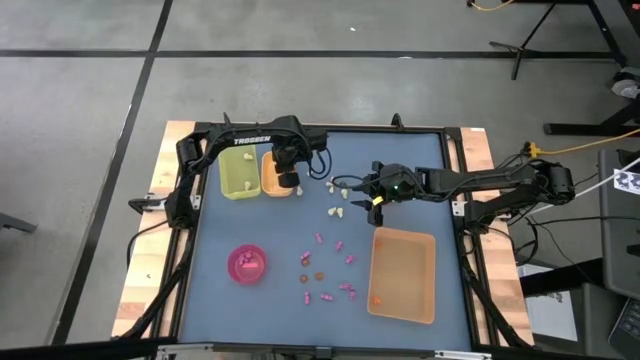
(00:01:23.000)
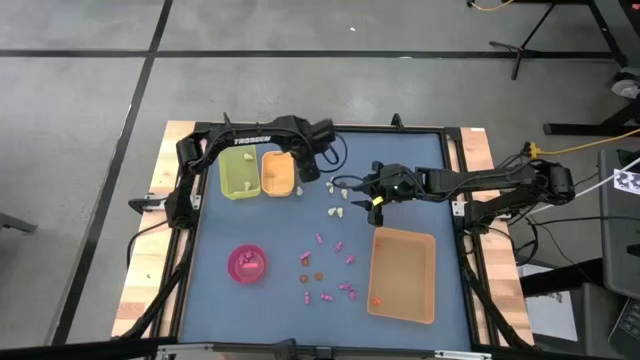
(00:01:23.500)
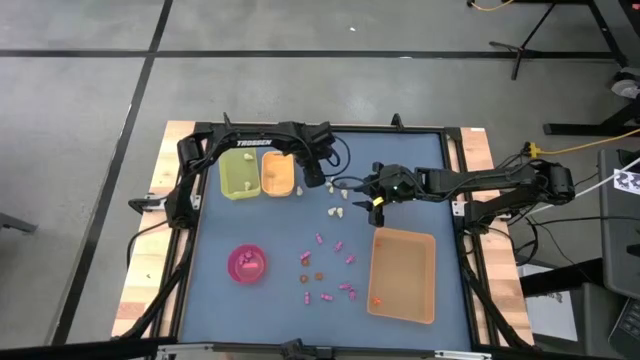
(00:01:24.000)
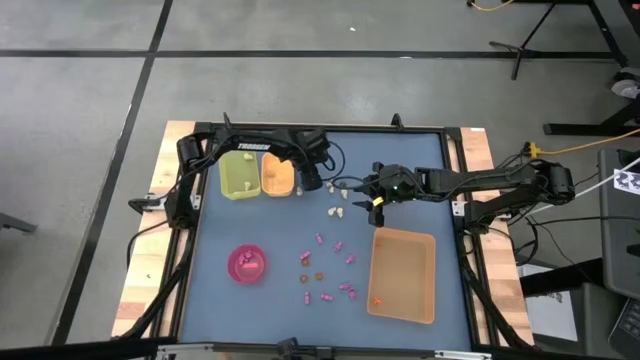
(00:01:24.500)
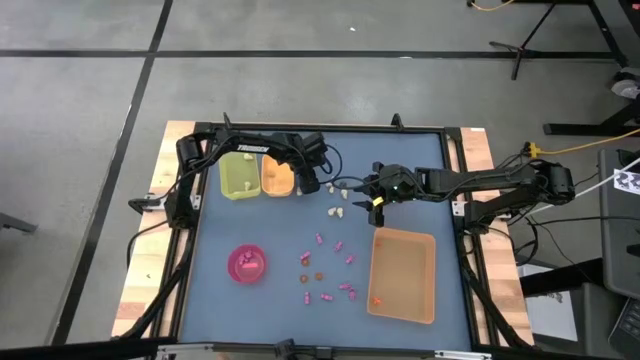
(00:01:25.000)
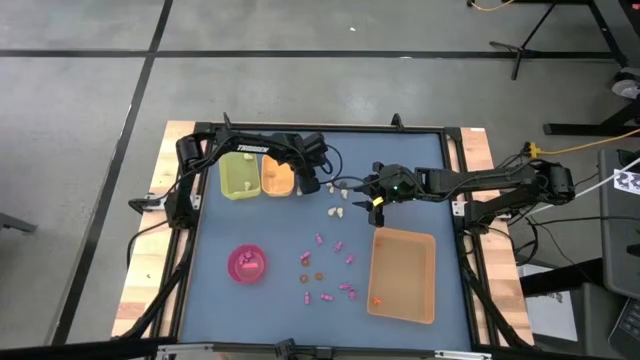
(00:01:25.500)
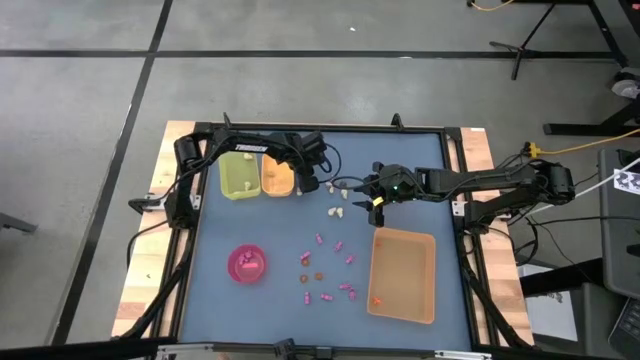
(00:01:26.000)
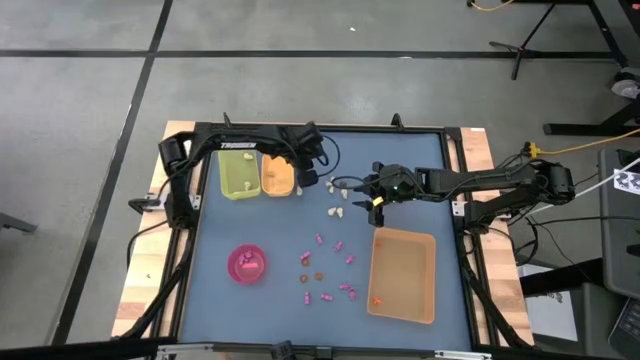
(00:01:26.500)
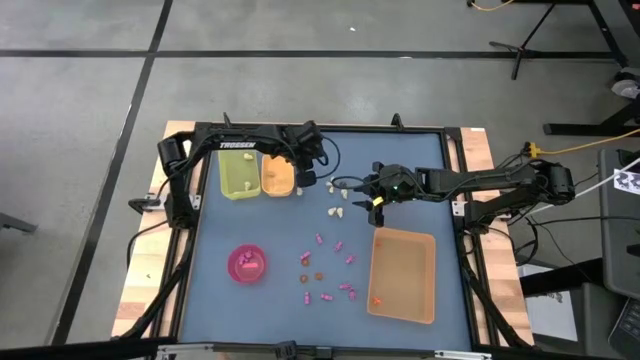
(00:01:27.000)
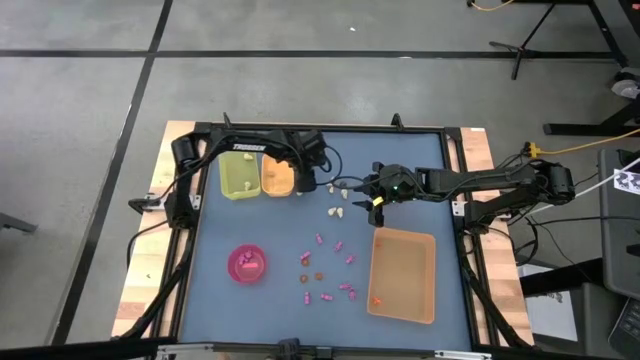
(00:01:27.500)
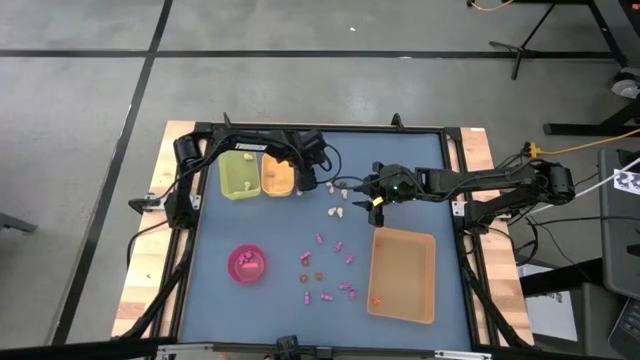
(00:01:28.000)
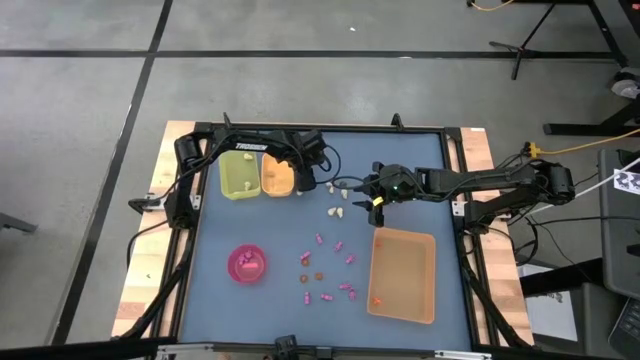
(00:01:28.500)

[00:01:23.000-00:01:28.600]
Task: Sort Halloween decoration
Put the small white skull toy into the yellow bin

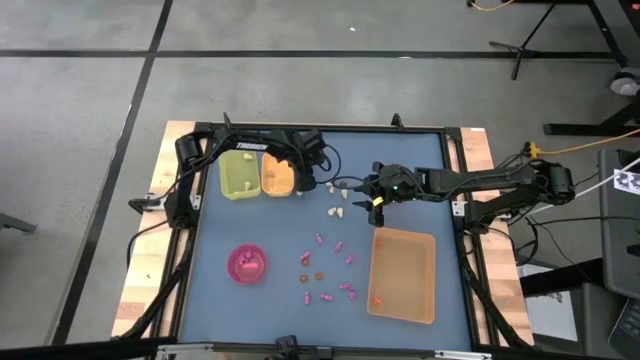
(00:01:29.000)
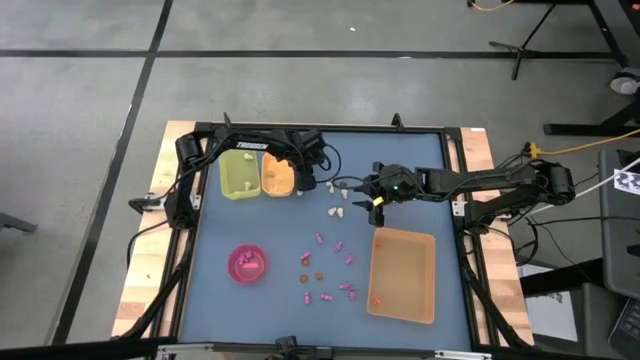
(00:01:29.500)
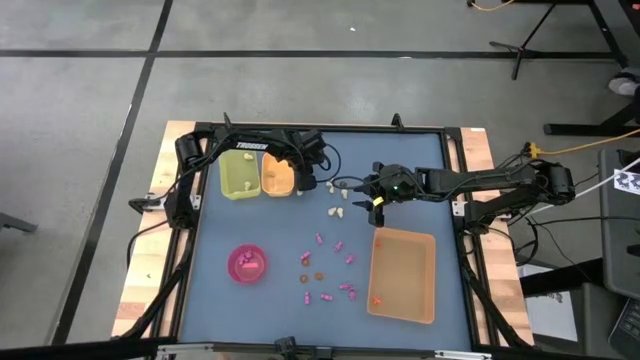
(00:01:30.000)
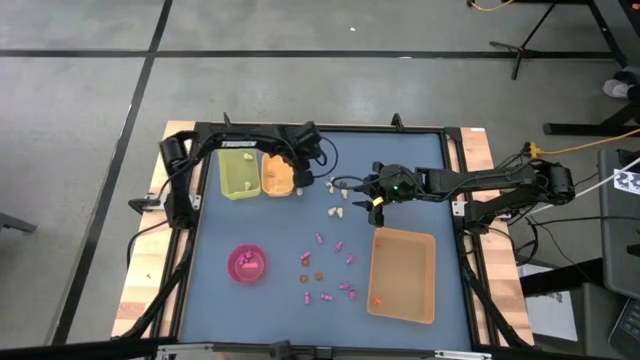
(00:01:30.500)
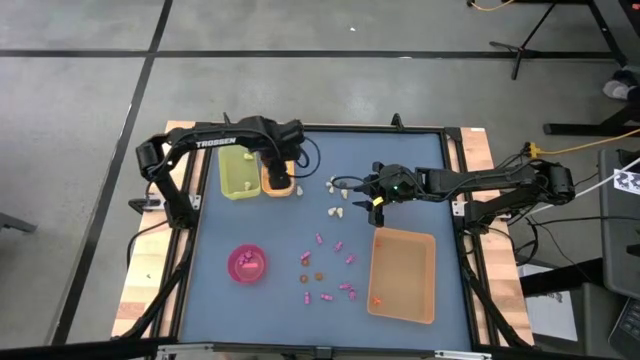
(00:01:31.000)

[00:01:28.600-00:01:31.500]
Put the small white skull toy into the yellow bin

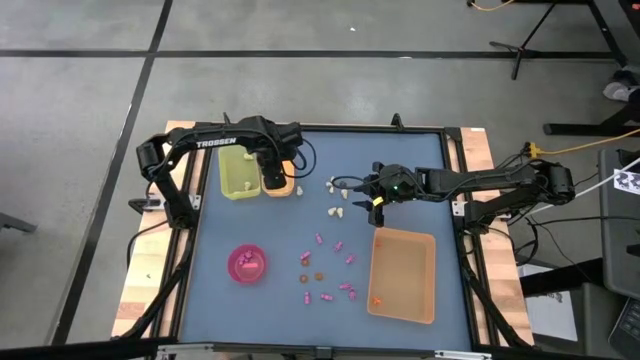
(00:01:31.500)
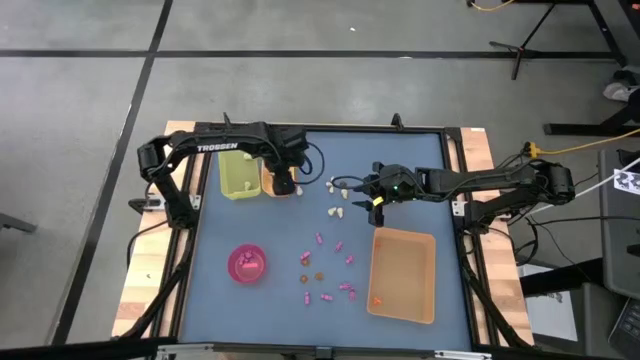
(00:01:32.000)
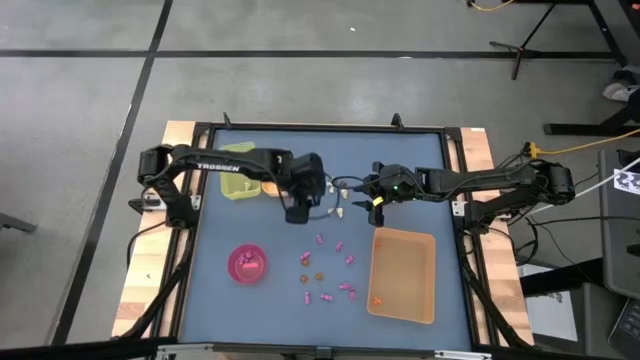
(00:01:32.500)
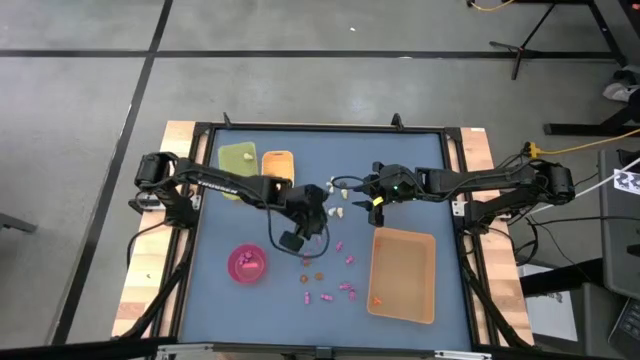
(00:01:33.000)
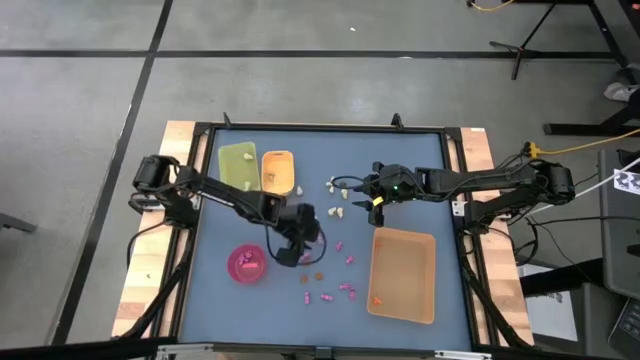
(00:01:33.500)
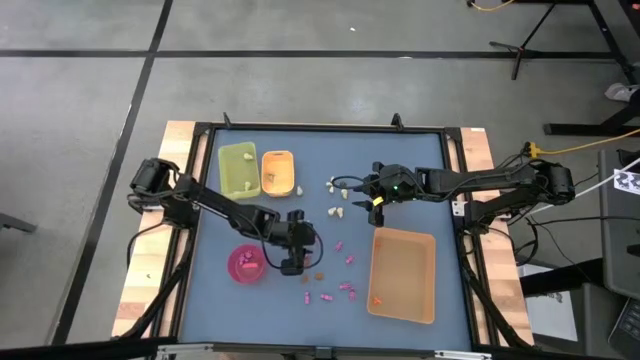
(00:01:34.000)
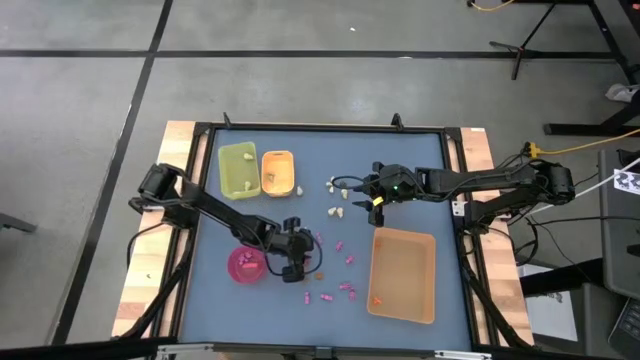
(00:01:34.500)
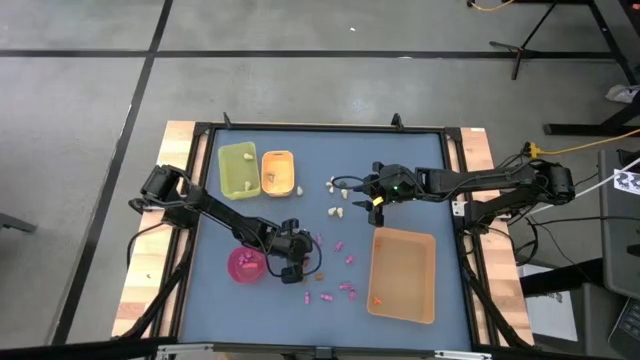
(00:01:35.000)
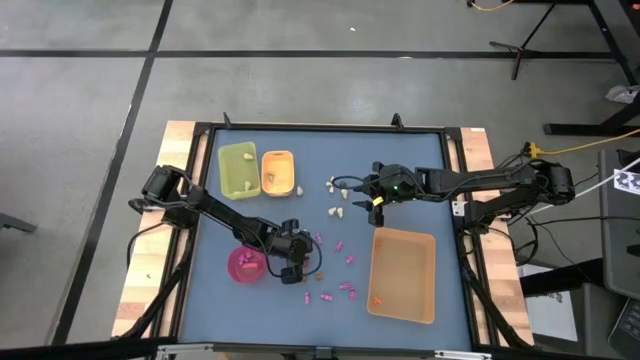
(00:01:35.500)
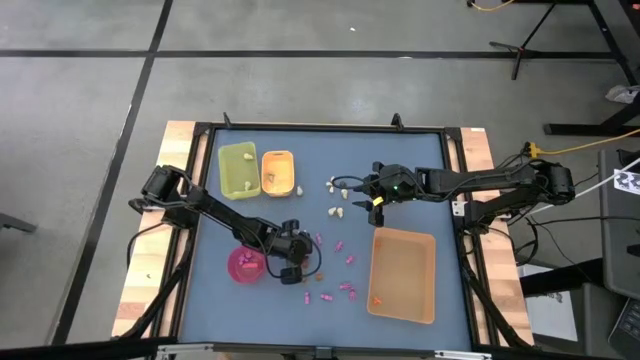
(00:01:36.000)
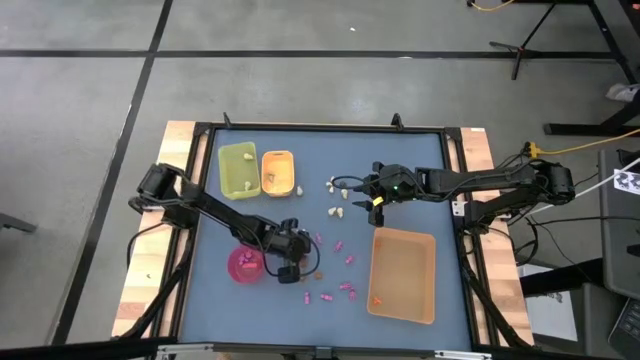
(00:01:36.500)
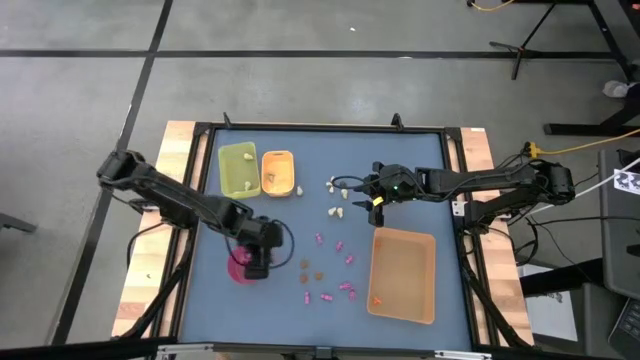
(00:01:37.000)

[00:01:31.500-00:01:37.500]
Put the pink skeleton toy into the red bowl

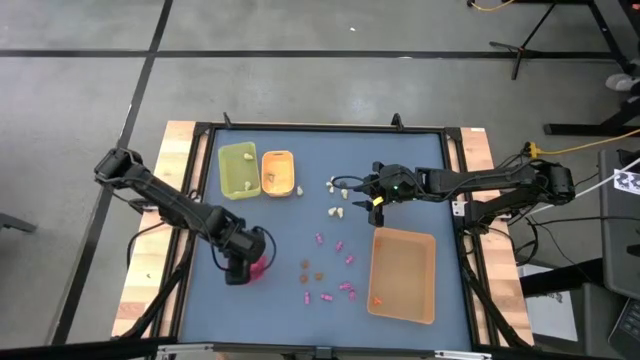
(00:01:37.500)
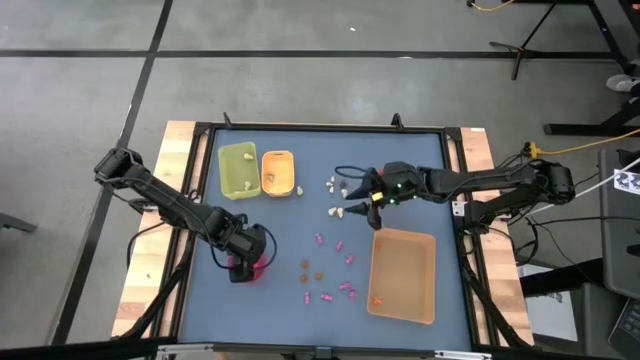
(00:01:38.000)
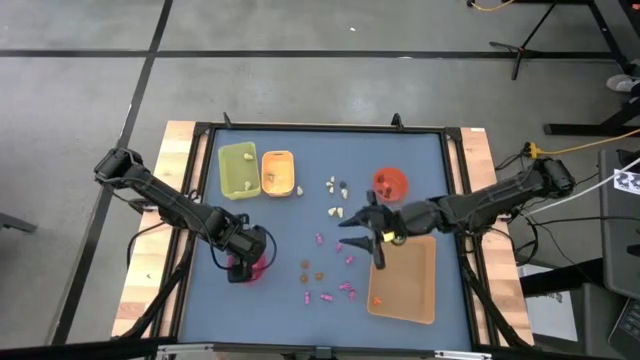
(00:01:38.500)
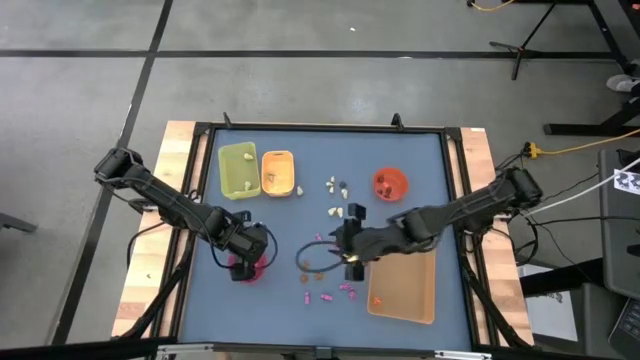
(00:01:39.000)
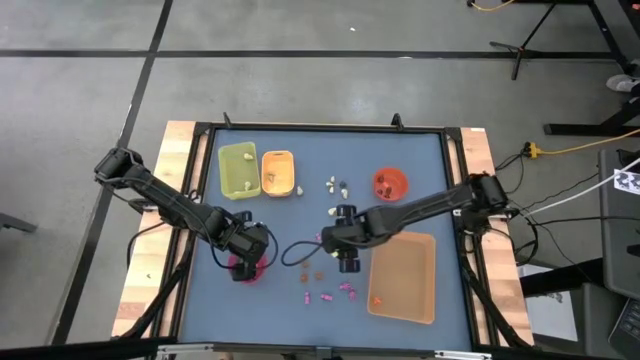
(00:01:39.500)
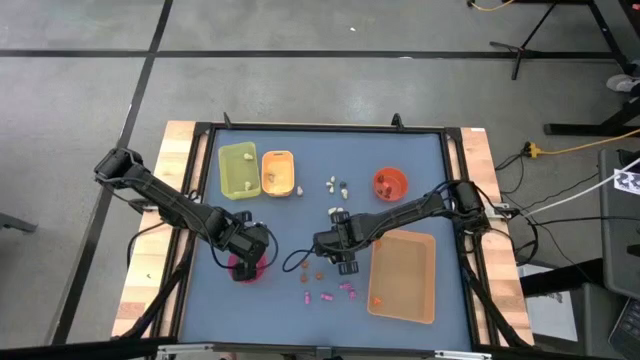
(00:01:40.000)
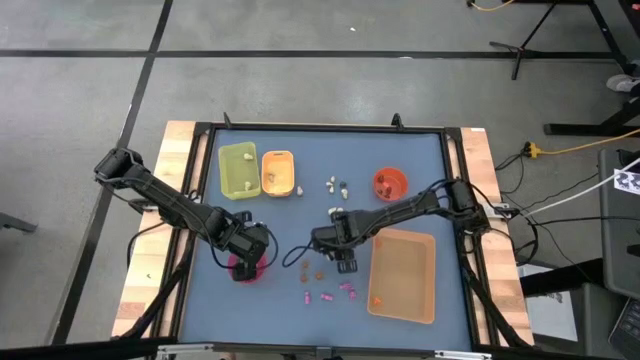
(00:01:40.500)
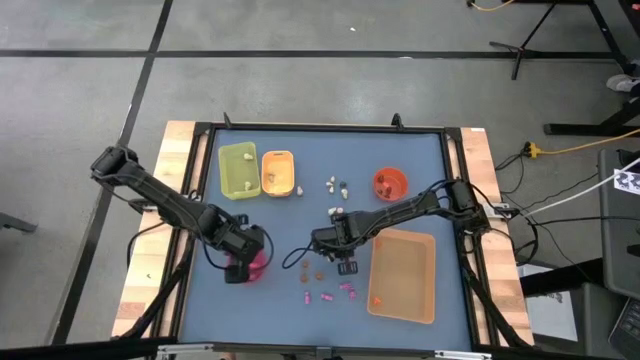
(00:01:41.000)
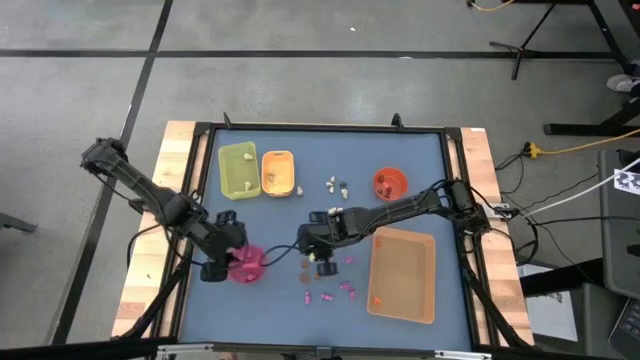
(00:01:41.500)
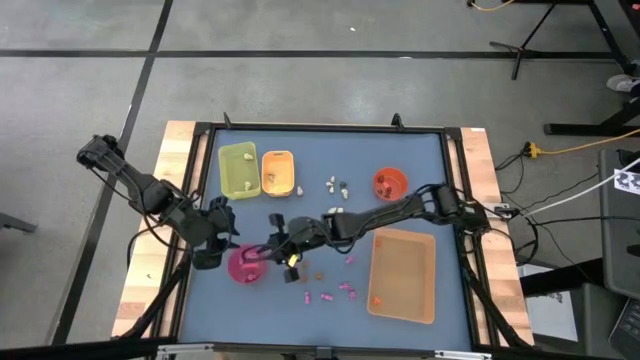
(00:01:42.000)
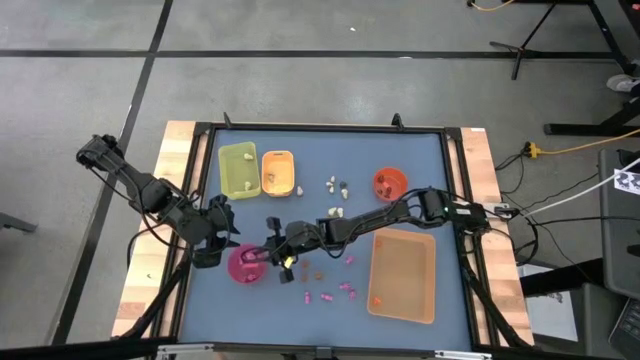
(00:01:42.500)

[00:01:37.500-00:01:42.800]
Put the pink skeleton toy into the red bowl
